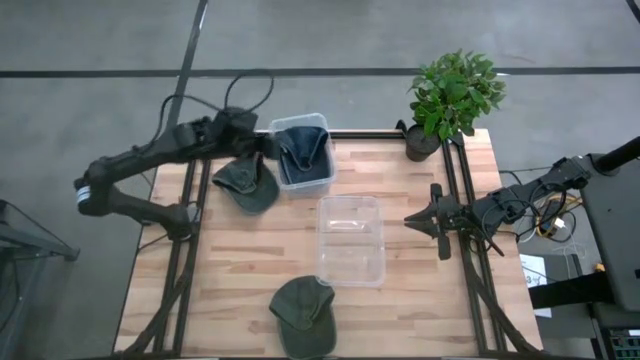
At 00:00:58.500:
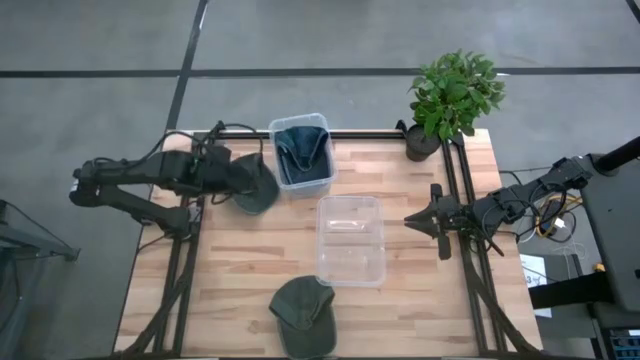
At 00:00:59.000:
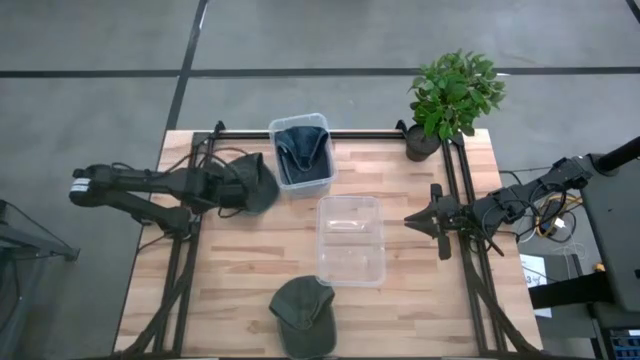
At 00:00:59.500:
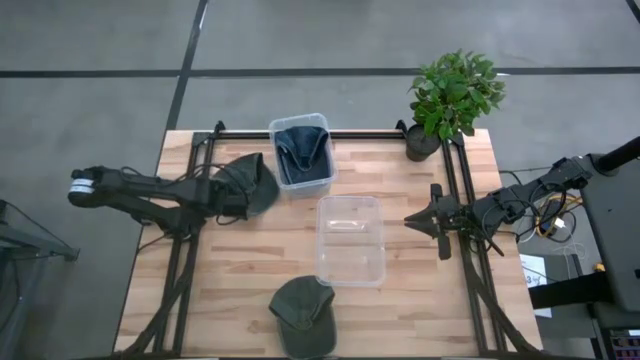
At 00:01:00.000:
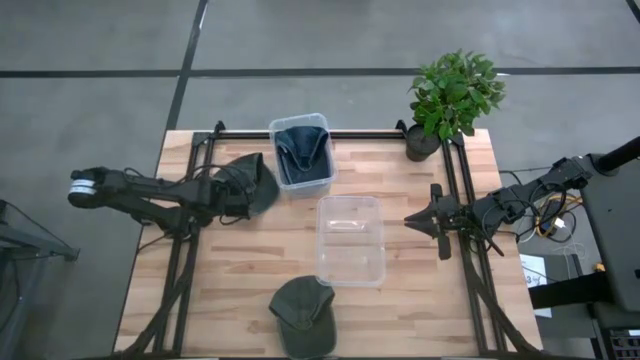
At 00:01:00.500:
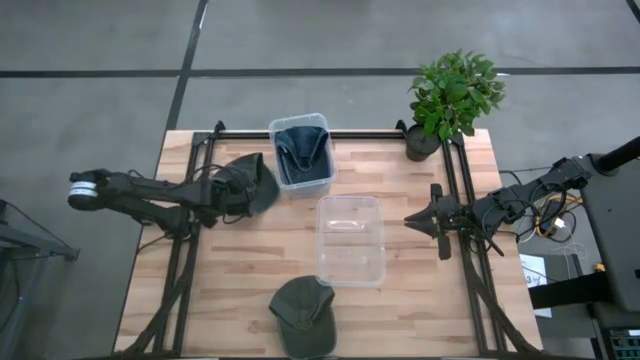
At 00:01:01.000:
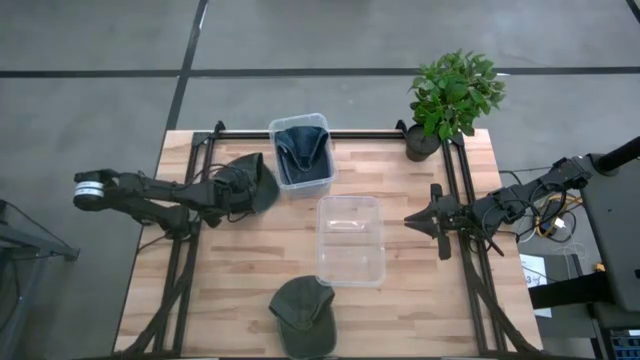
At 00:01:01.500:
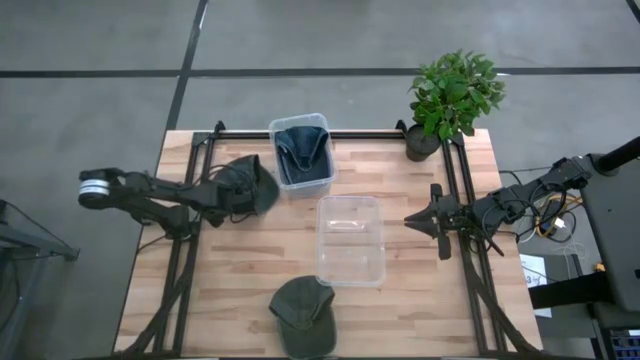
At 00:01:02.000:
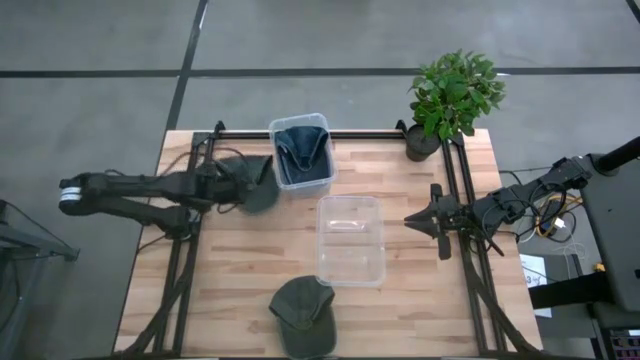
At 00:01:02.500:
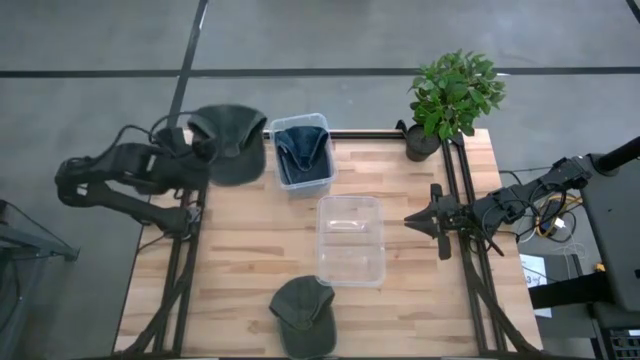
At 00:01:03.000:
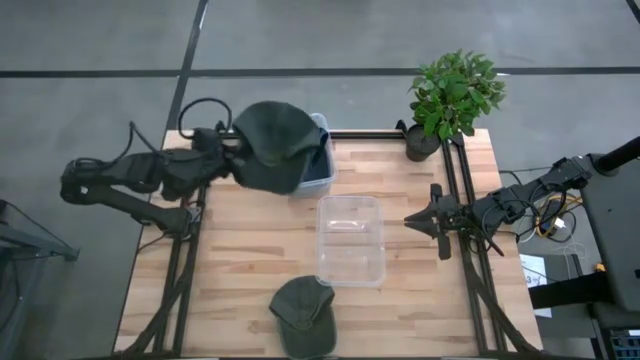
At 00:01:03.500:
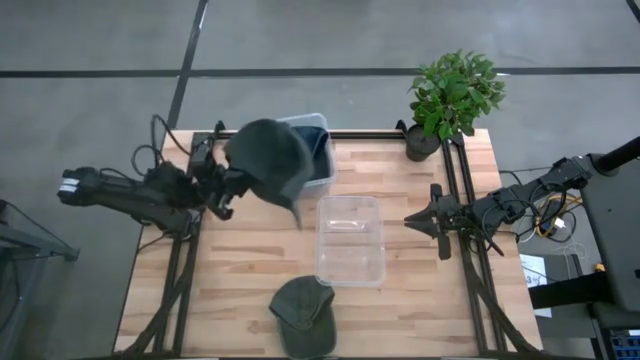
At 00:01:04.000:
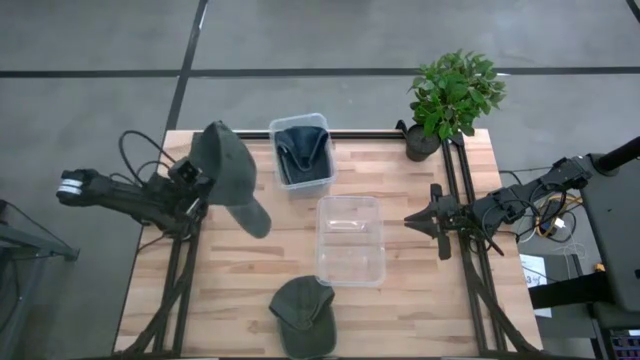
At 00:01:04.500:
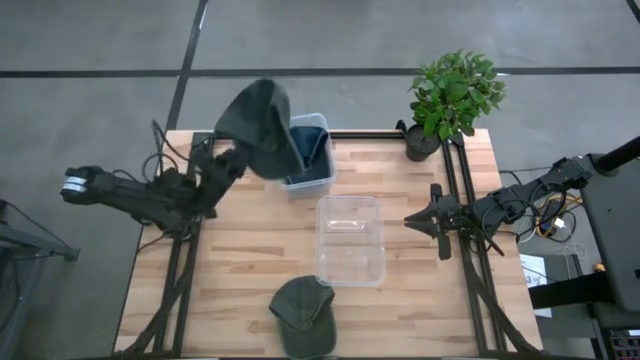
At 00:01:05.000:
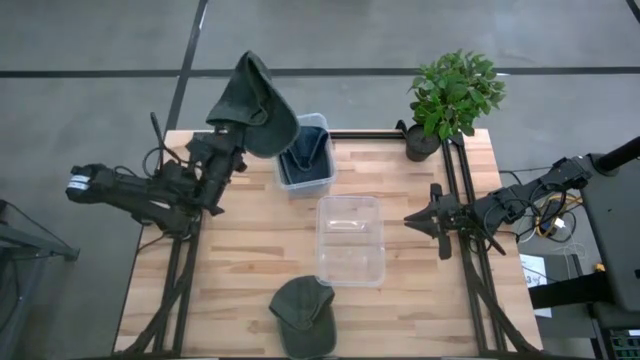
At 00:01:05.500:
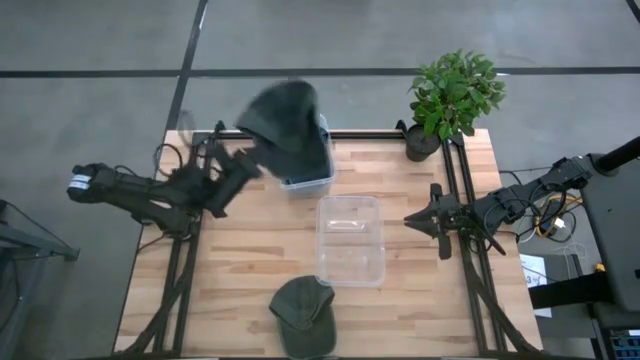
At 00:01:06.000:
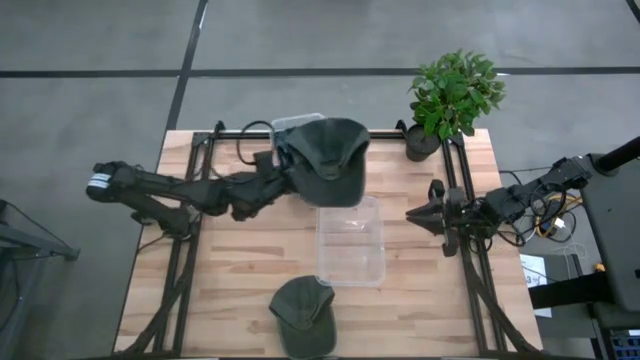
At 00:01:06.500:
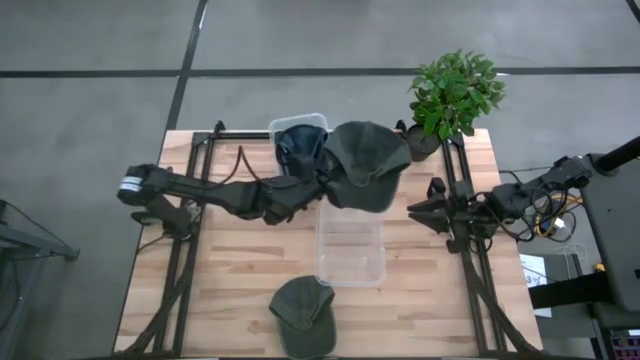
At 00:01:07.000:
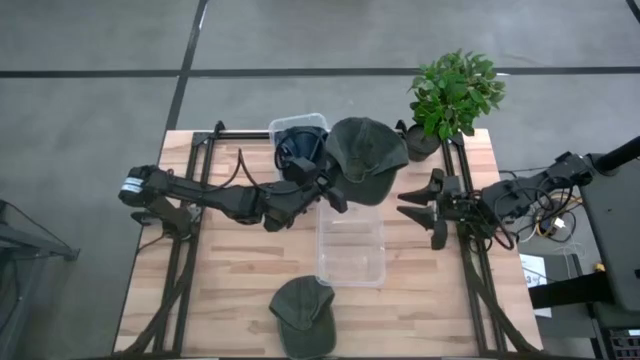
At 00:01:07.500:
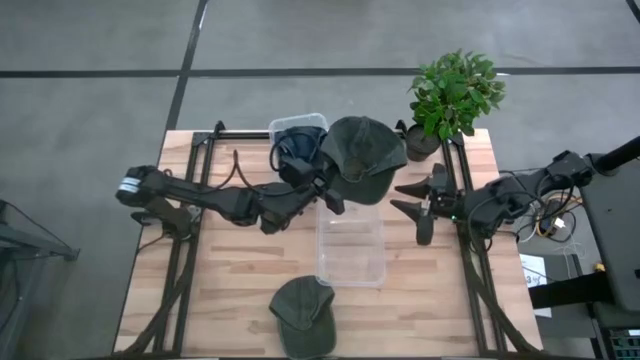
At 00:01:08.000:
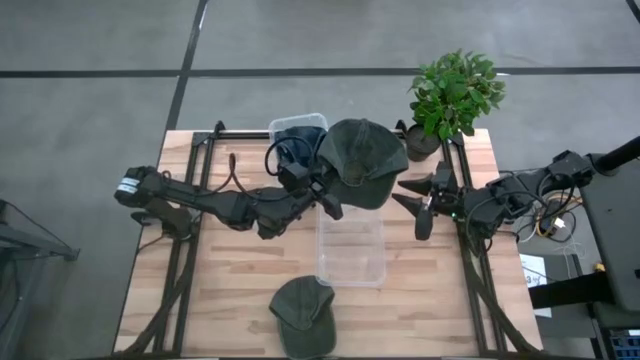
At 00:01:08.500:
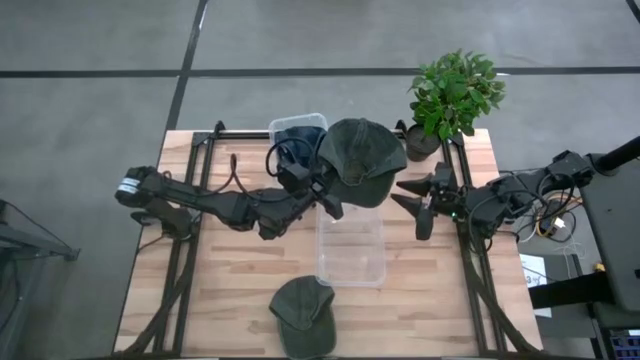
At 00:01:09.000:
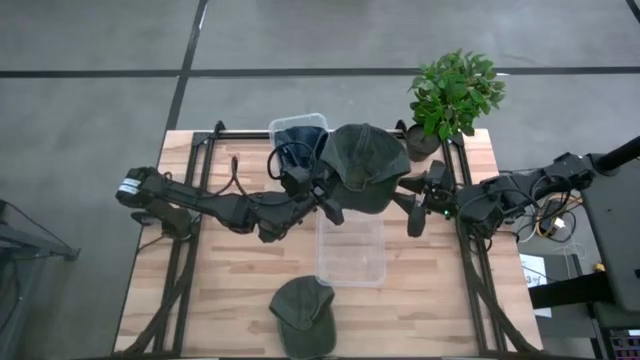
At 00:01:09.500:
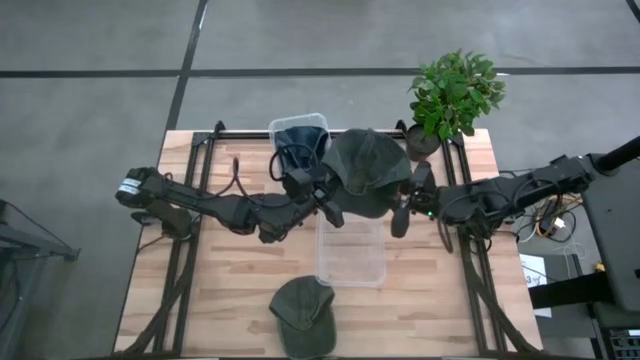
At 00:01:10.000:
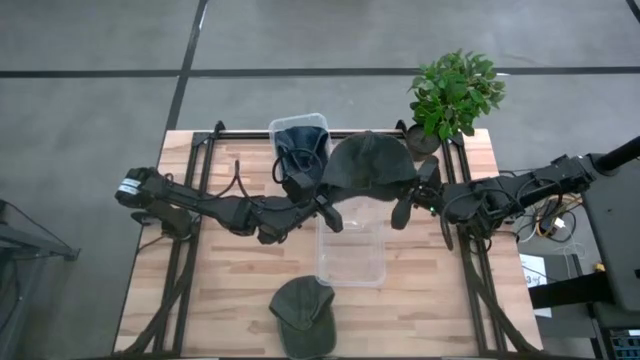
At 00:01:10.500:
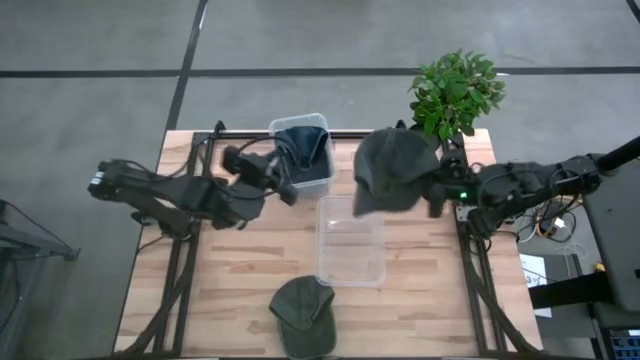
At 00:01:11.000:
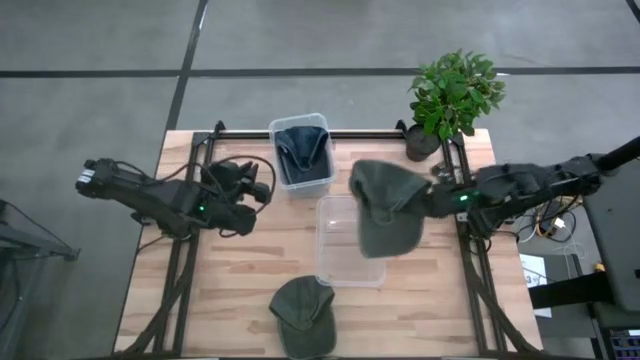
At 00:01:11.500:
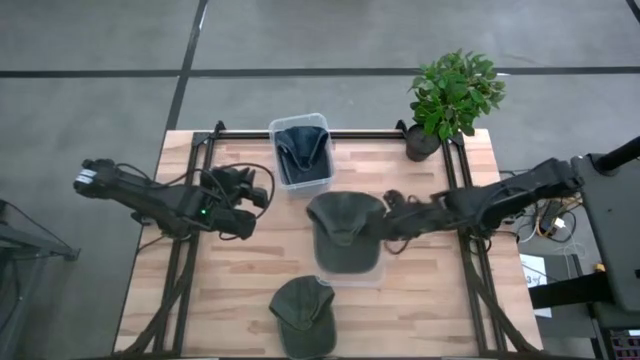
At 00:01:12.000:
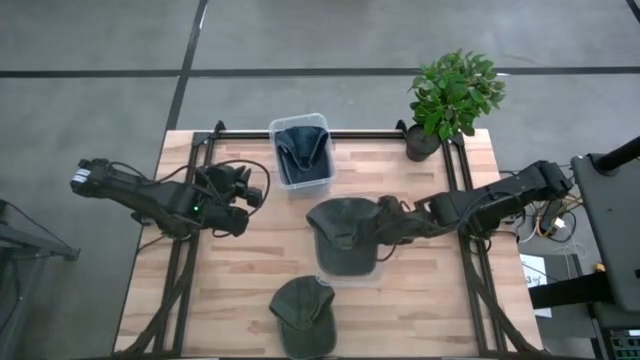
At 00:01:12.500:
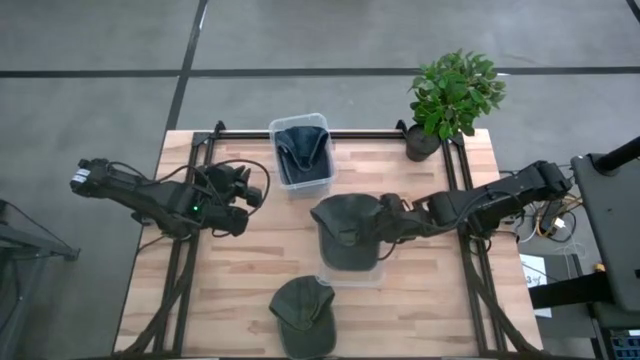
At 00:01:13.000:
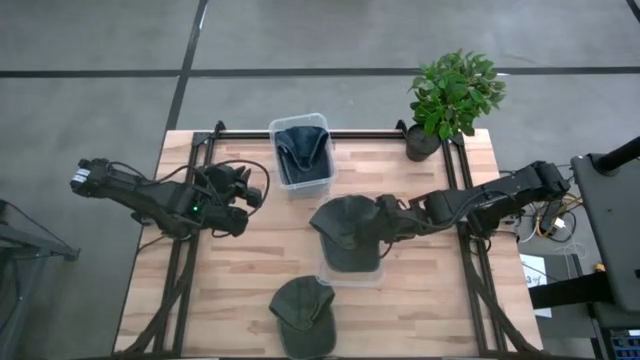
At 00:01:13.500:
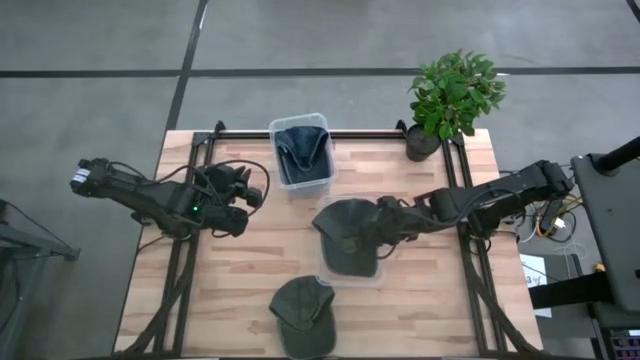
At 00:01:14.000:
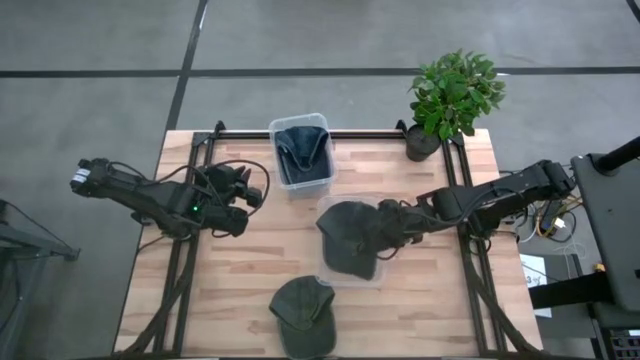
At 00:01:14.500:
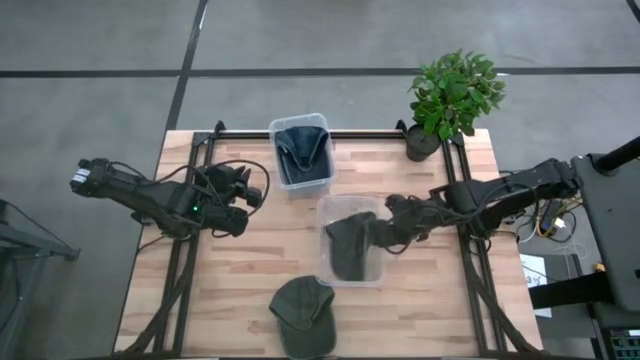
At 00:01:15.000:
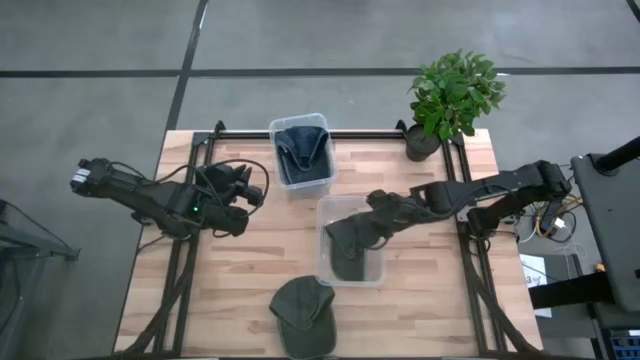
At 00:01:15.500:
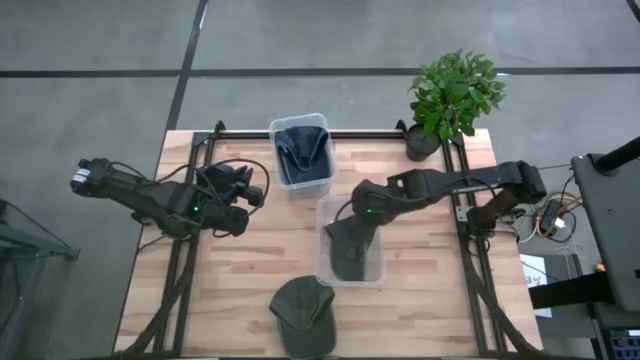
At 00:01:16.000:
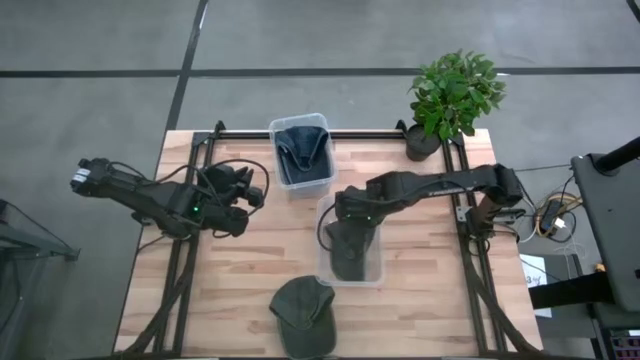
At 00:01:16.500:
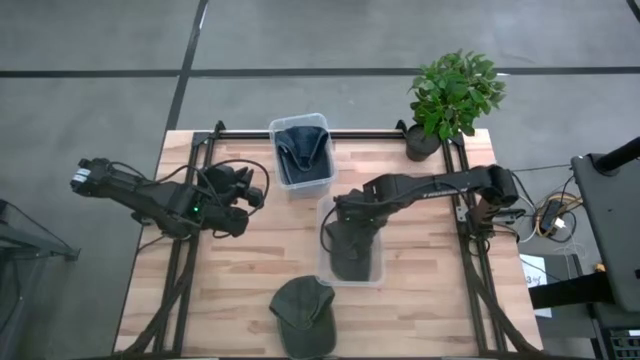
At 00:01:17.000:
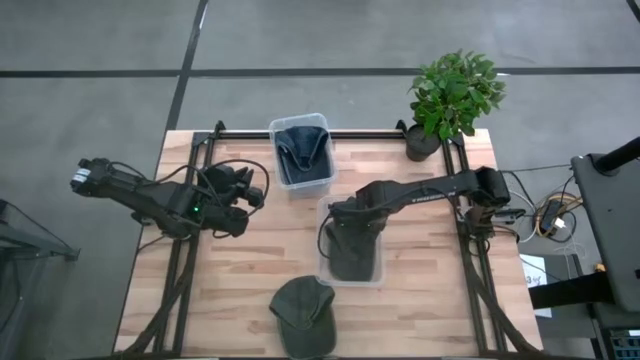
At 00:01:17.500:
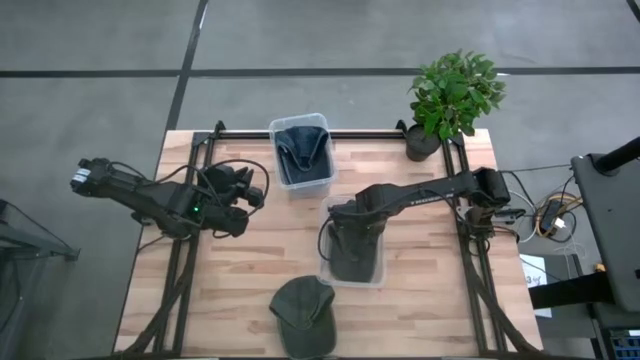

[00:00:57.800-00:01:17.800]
Task: Pick & Place hat
Put the top black cap into the bottom transparent bin

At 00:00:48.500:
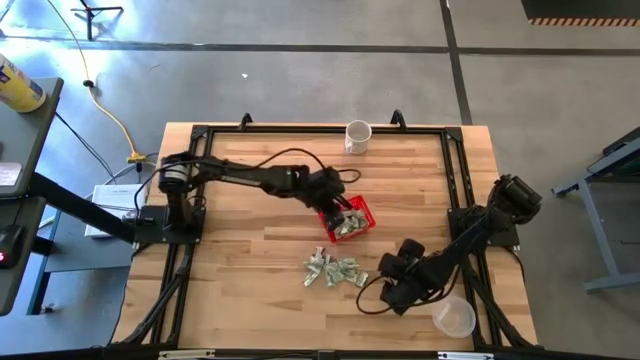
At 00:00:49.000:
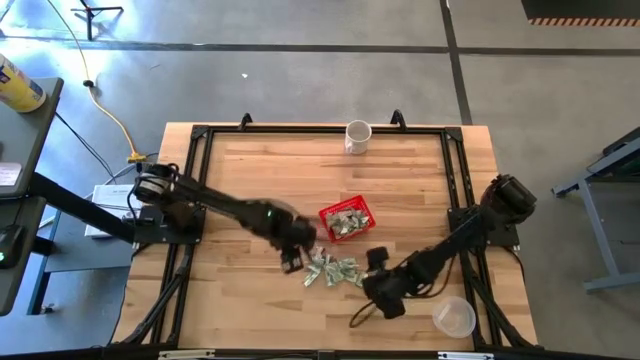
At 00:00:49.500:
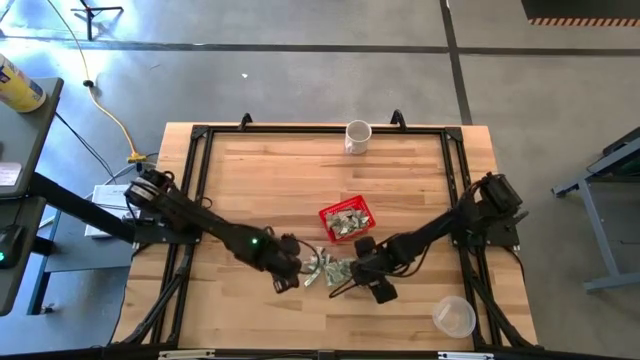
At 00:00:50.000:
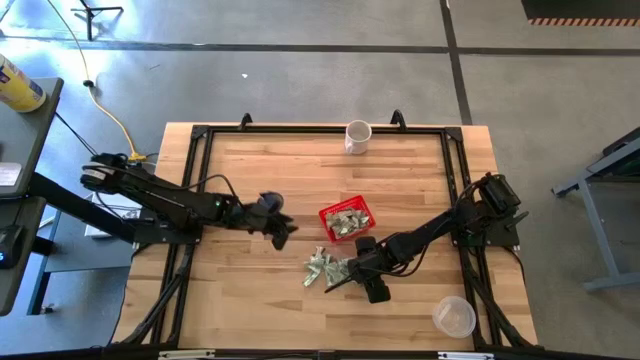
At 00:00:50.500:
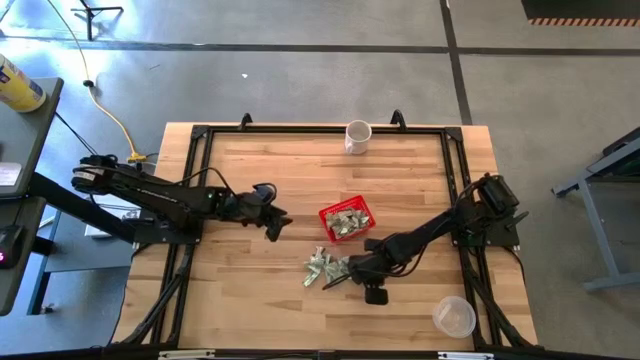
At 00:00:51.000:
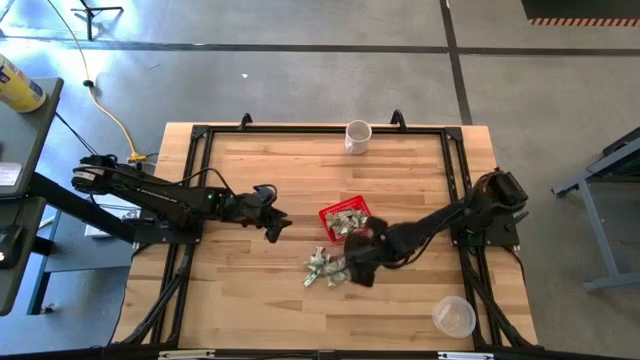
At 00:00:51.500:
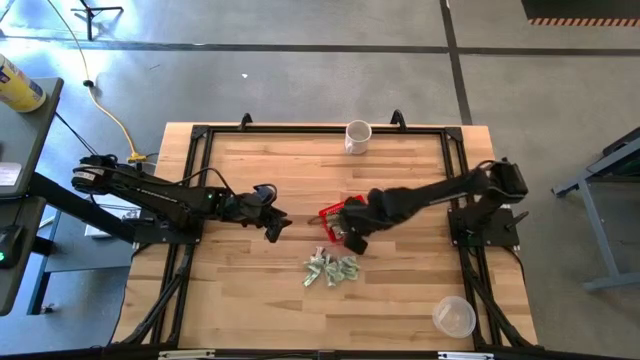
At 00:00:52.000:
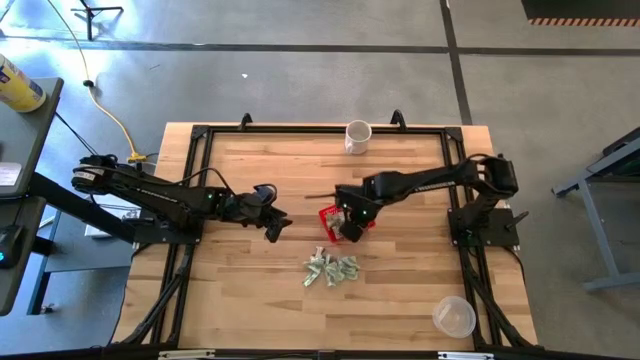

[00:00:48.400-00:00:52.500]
Task: Pick and place items into bin
Put the green truvia packet into the red bin
